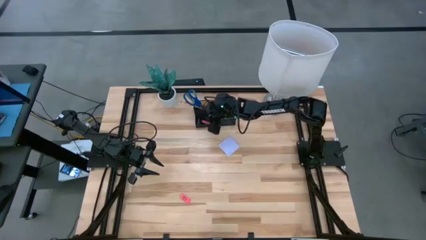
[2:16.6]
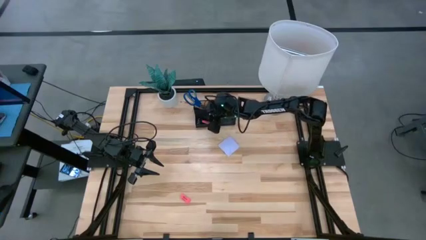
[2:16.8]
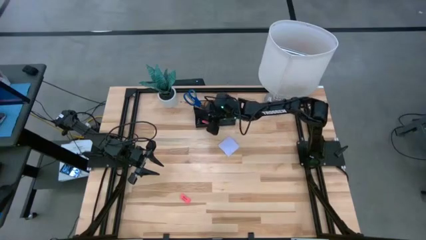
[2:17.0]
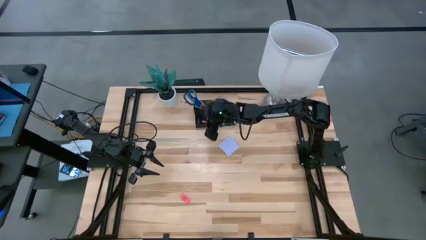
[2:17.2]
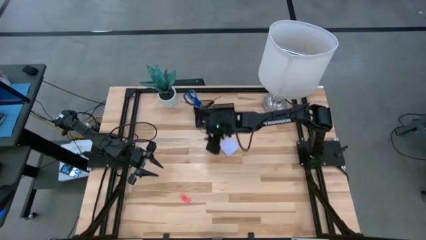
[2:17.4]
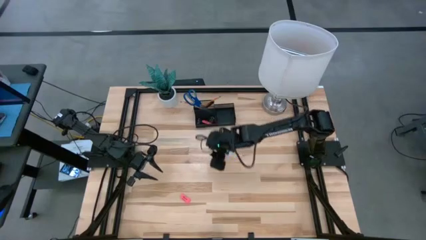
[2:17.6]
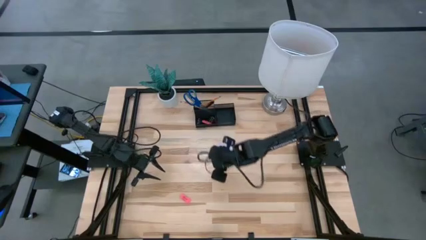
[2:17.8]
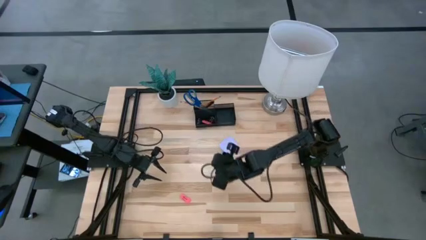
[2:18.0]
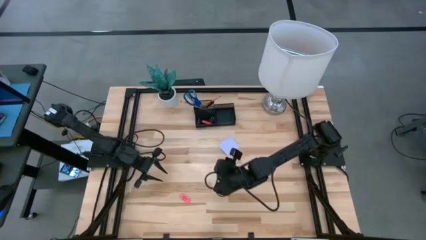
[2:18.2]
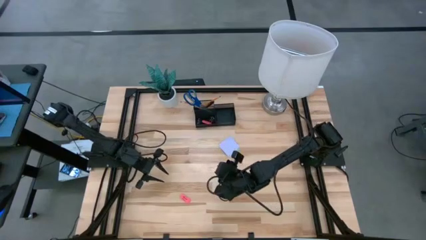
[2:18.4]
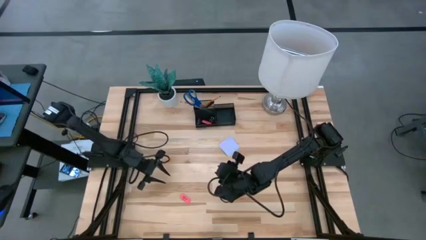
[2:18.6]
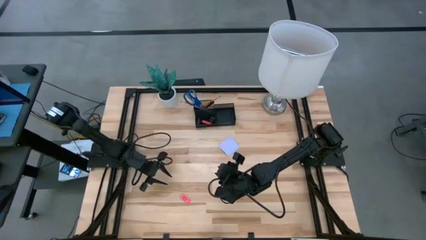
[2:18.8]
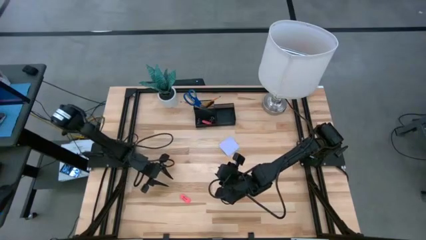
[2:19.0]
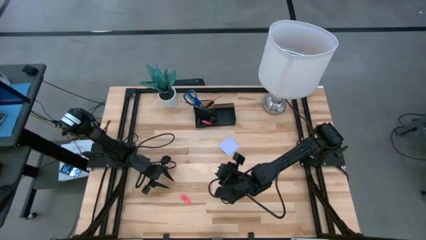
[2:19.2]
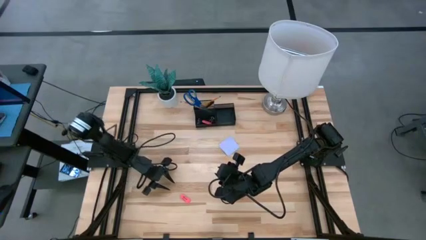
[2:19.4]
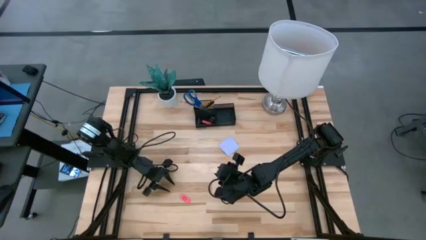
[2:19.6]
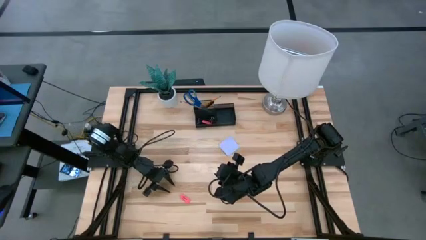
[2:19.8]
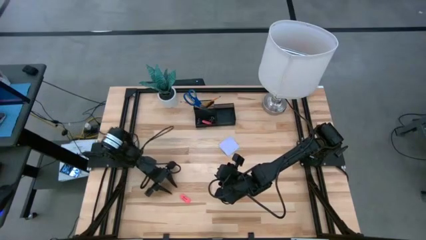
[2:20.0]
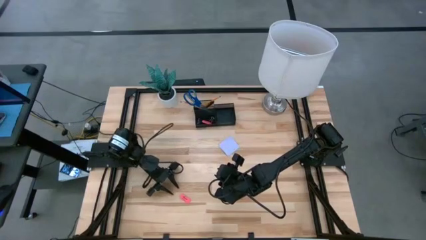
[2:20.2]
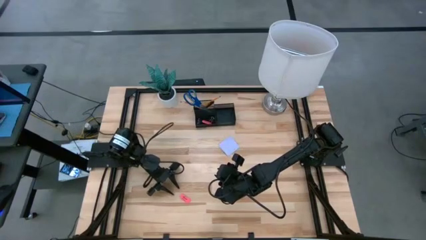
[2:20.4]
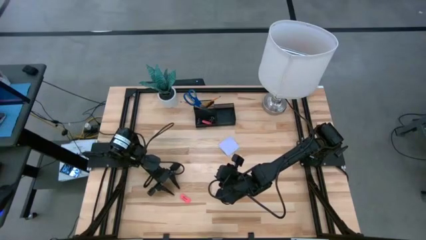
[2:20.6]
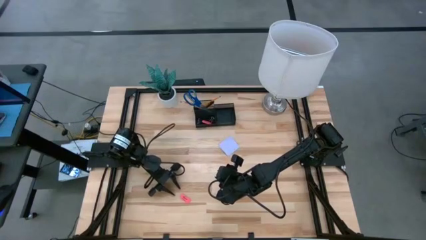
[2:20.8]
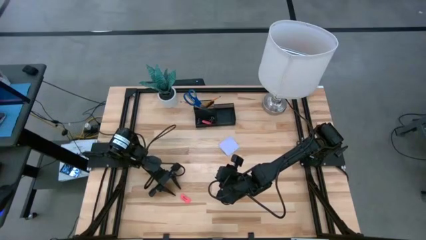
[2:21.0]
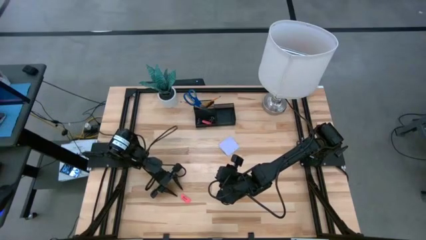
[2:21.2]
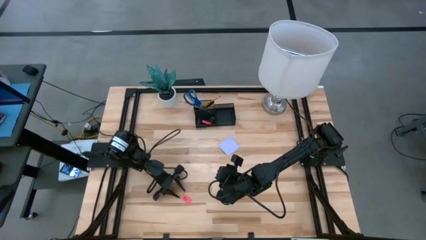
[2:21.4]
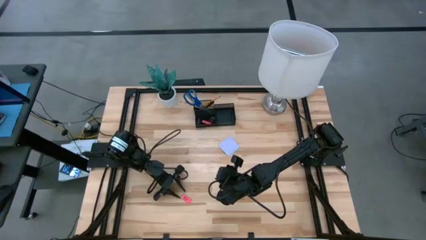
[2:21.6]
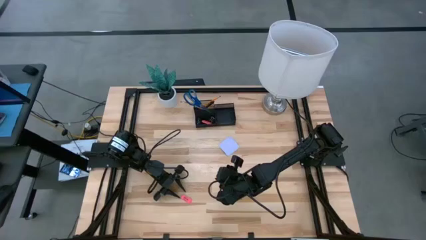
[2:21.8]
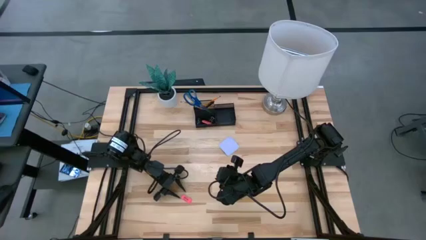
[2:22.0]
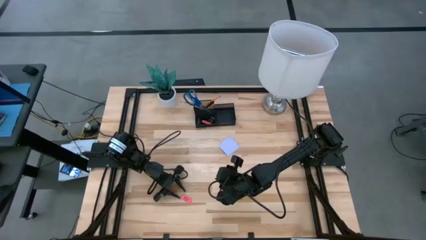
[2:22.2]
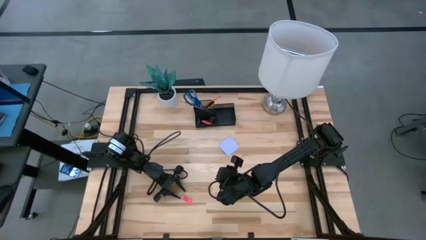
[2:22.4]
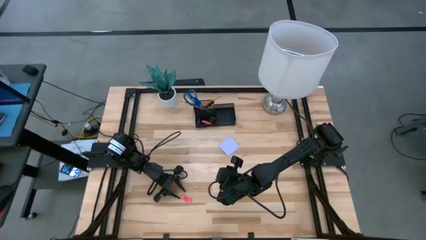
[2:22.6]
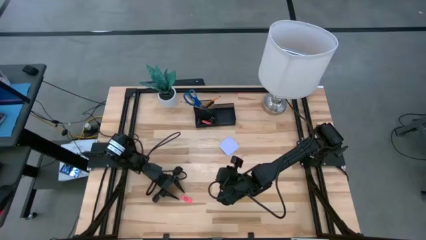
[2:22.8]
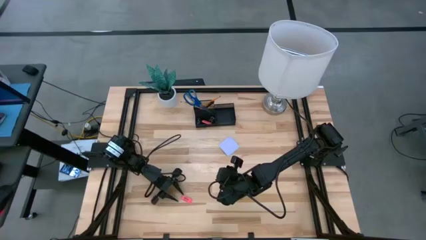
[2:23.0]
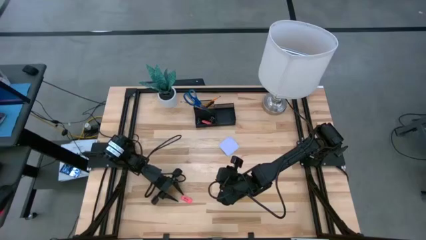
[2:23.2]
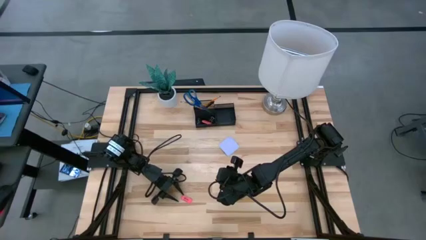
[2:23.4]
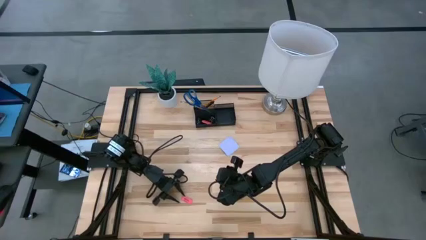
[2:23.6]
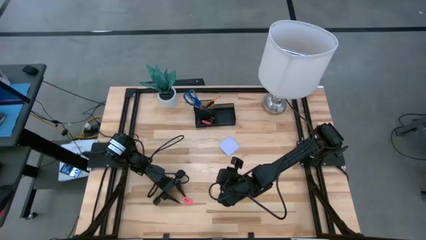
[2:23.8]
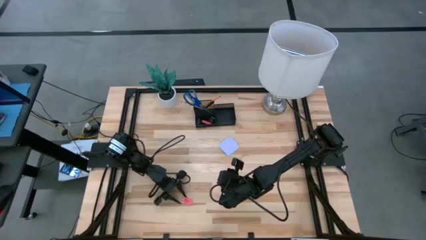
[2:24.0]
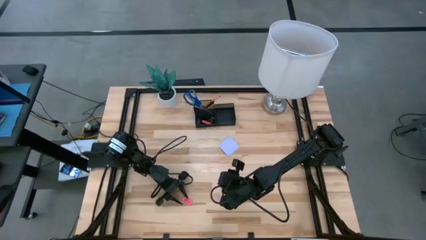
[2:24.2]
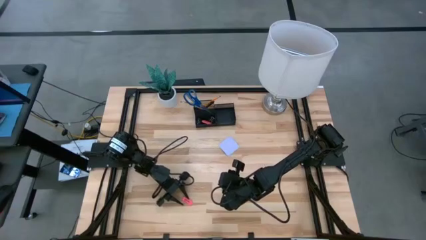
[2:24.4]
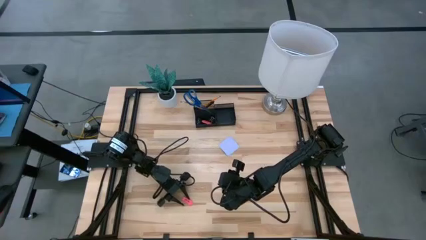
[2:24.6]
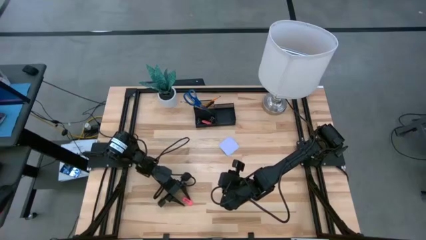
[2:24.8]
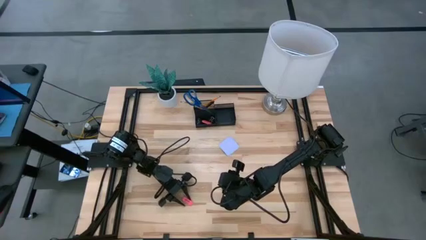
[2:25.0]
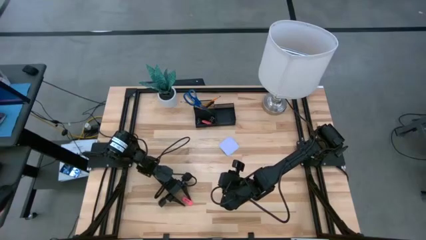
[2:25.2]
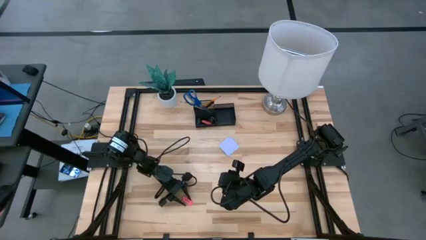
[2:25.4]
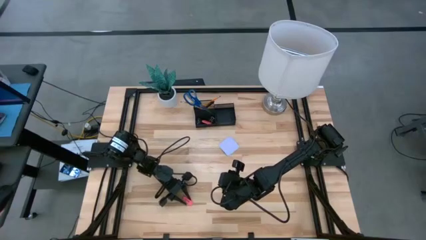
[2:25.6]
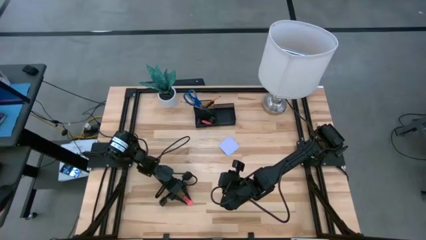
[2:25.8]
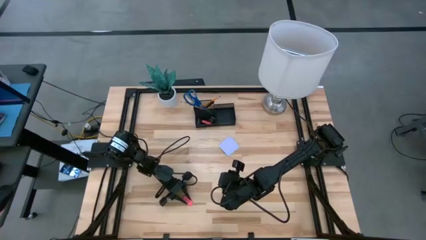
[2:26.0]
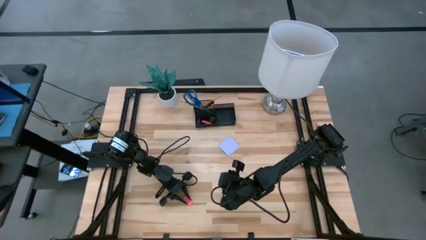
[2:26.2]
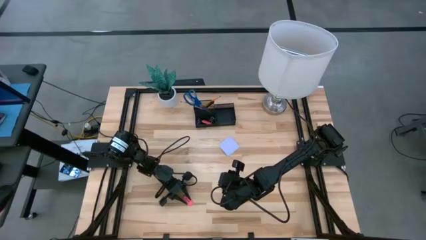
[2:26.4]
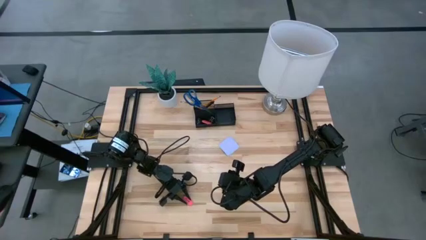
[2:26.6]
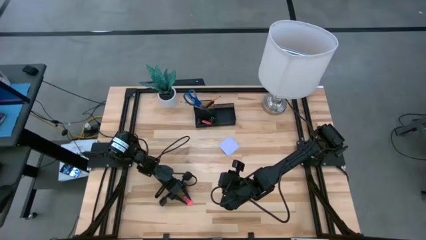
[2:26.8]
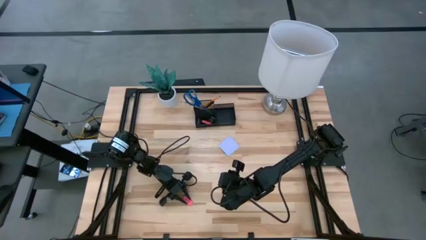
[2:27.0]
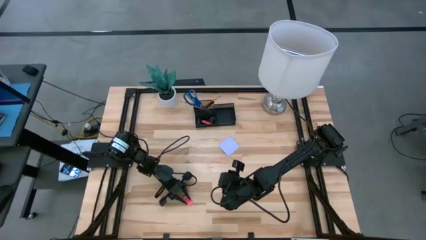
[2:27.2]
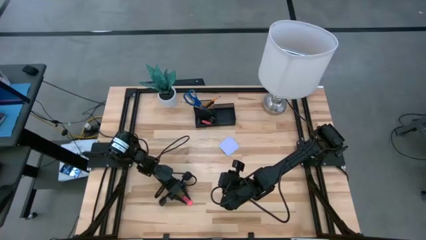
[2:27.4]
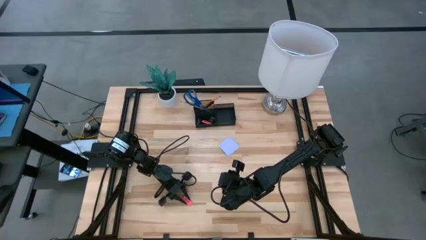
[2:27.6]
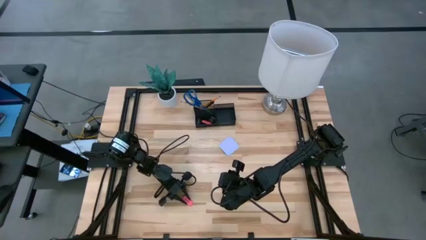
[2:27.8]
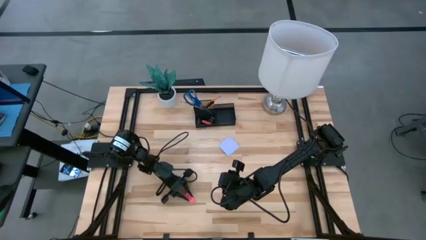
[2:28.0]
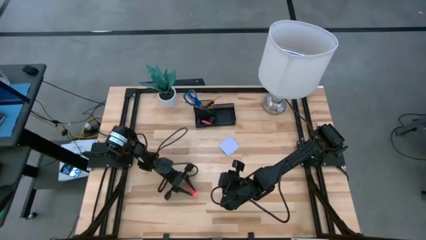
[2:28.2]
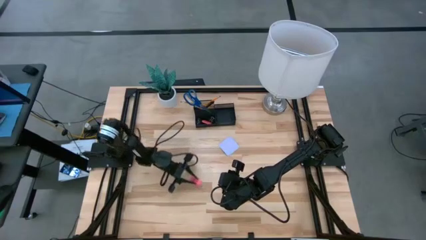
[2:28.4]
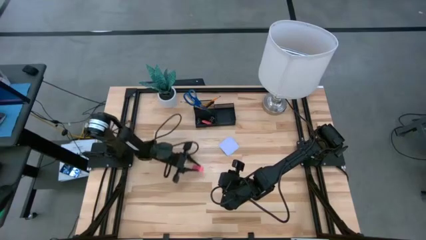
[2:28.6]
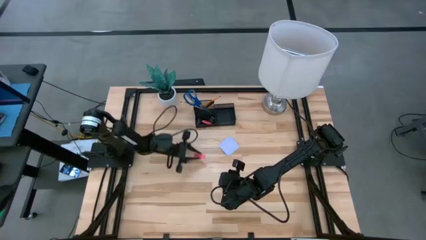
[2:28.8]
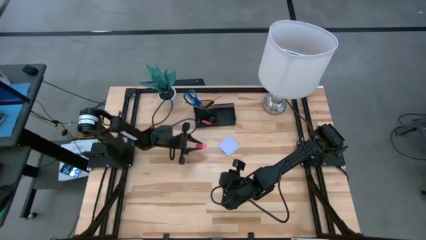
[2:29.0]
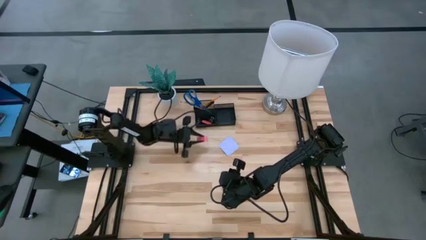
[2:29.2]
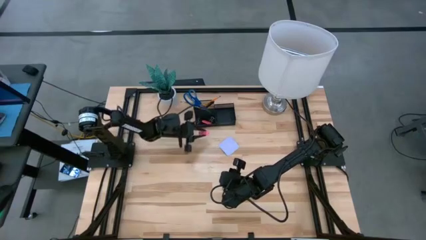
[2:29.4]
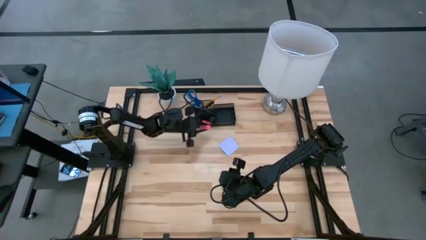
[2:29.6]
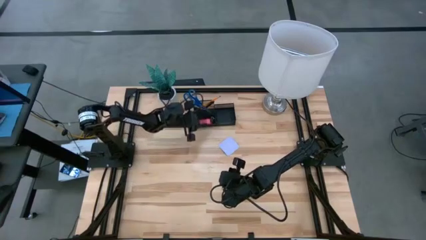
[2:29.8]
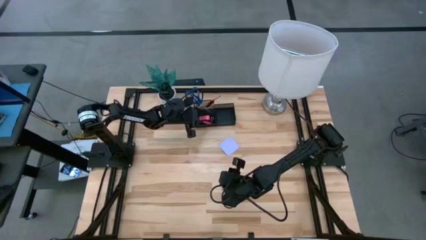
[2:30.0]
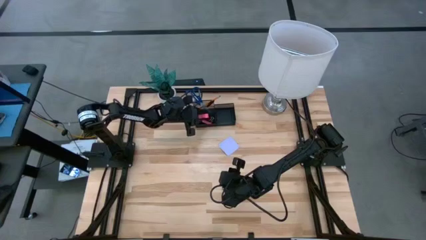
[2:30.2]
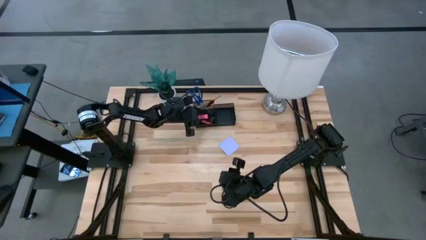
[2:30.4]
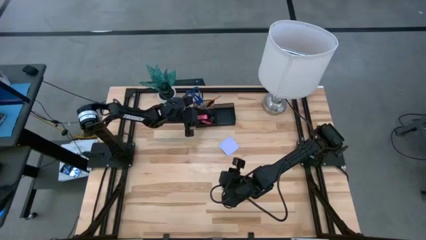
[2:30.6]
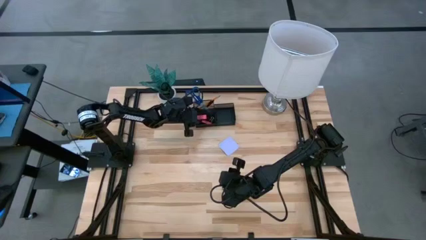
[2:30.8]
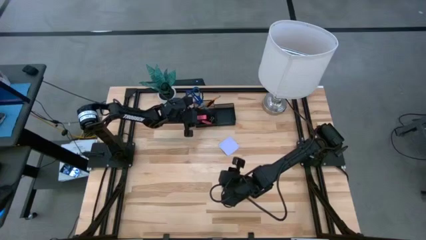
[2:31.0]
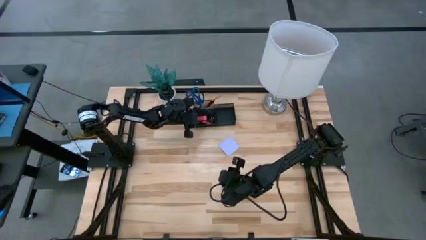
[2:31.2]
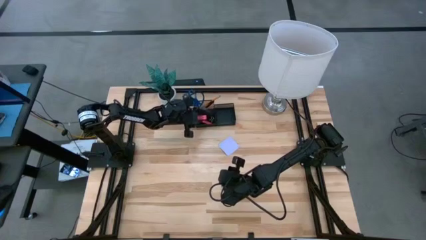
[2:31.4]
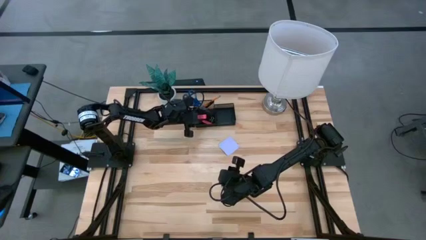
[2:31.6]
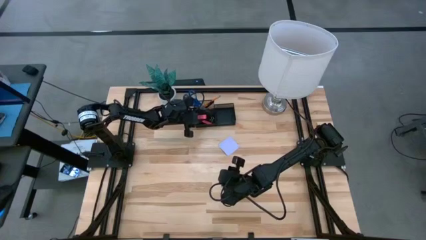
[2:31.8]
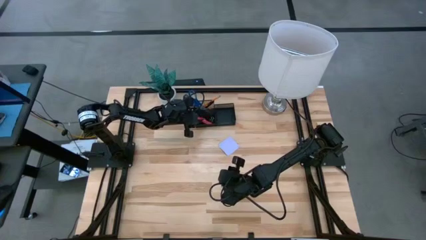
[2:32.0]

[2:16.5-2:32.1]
Task: Pick and place office supplies into organizer
Put the pink eraser into the black desk organizer
